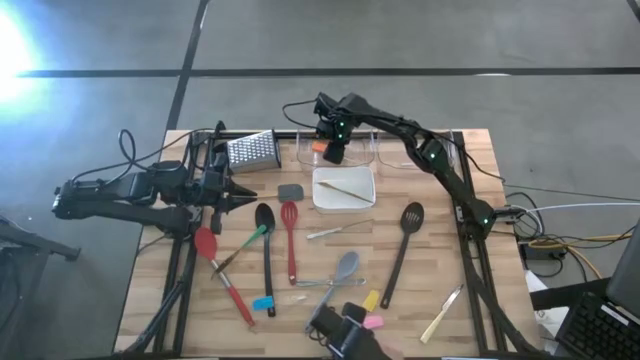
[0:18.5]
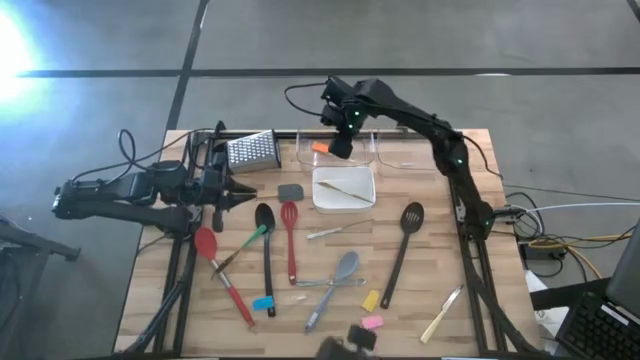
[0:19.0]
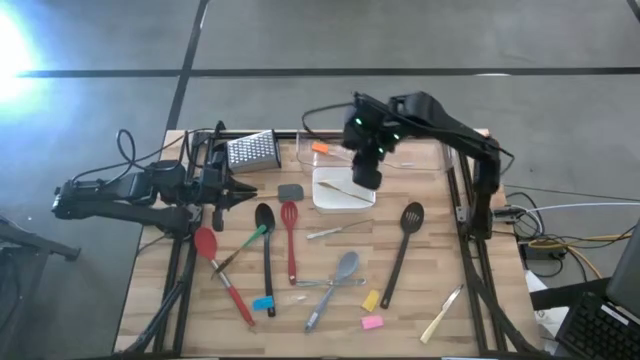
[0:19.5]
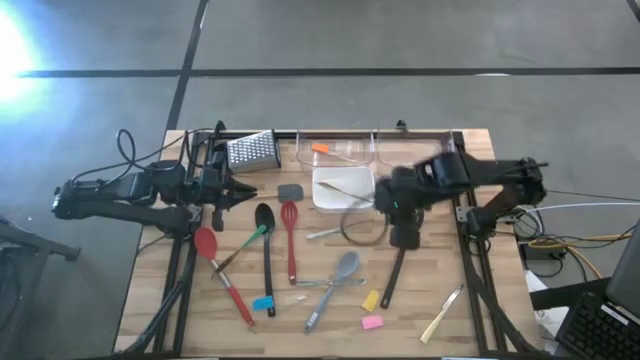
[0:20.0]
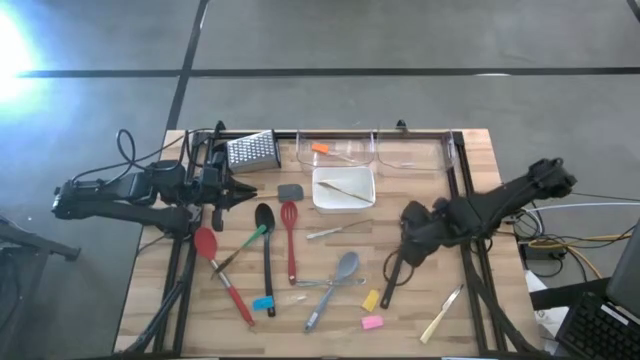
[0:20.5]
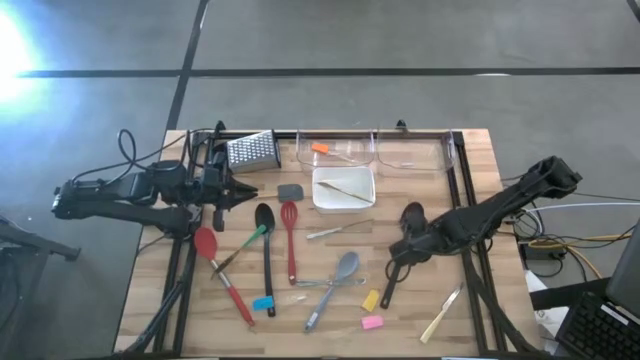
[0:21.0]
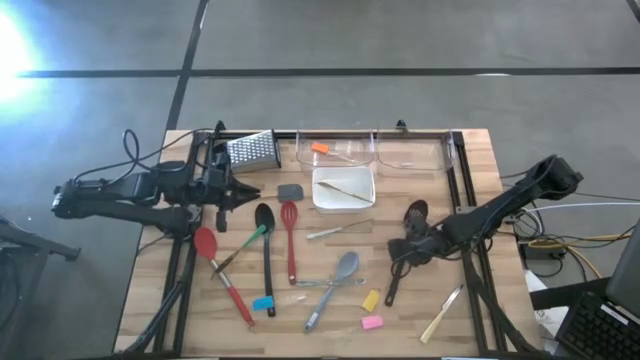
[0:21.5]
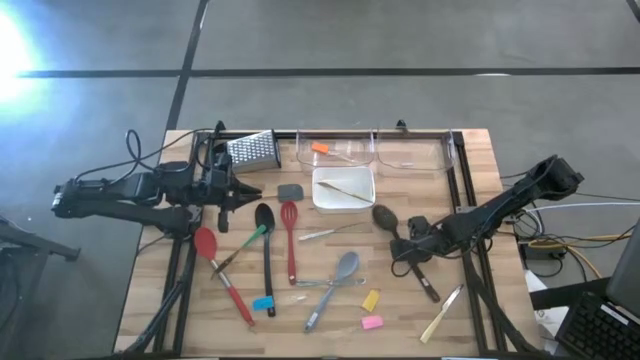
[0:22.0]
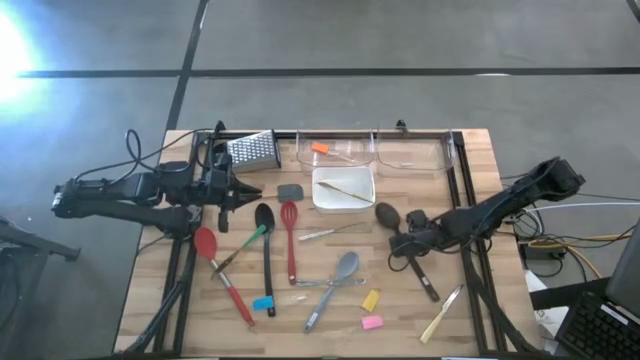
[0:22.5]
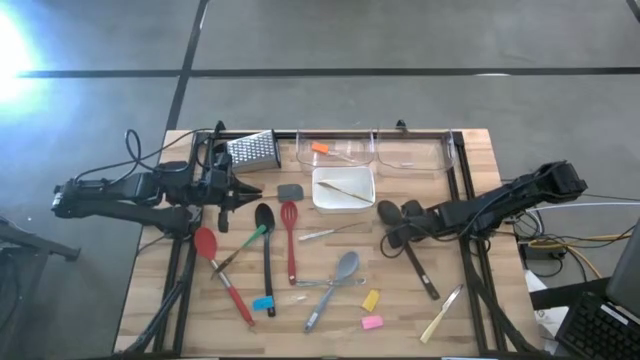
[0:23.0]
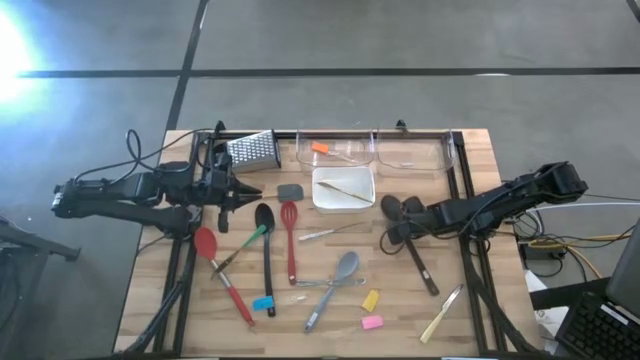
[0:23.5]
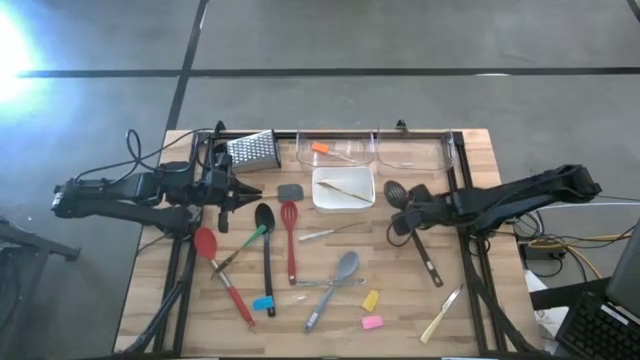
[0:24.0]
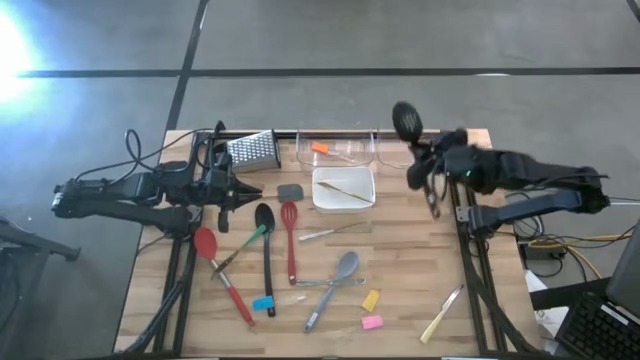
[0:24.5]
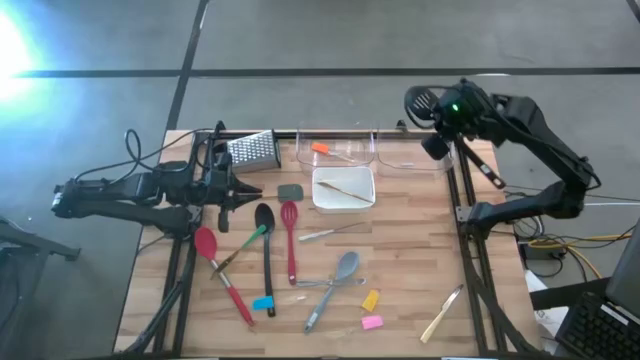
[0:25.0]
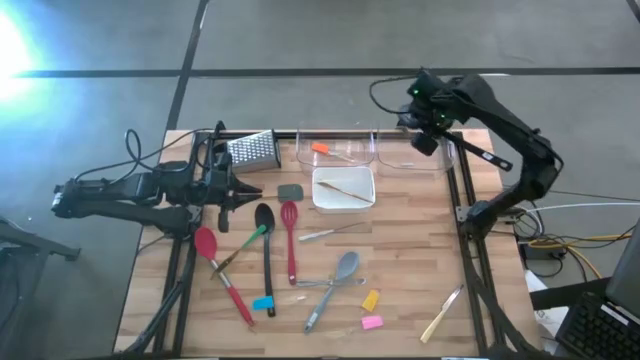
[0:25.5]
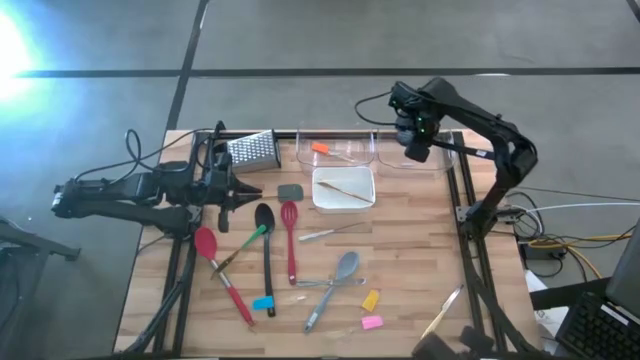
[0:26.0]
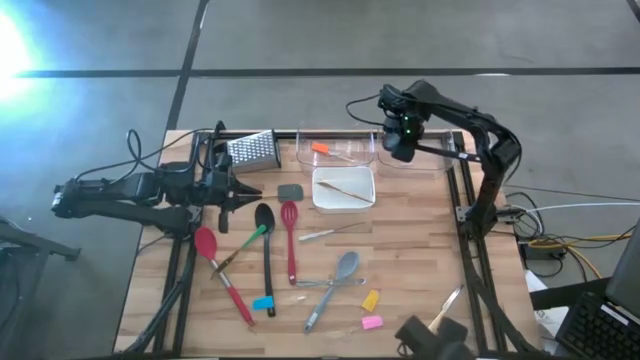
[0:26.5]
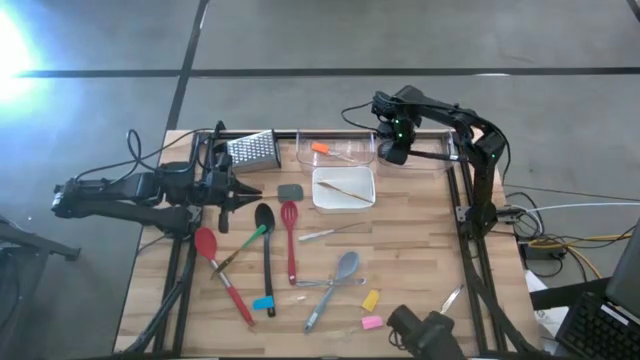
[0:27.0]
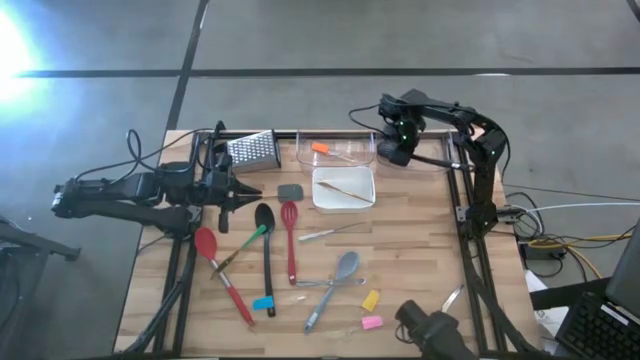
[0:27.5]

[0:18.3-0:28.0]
Task: Pick & Place Kitchen Items
Put the black slotted spoon into the right transparent bin

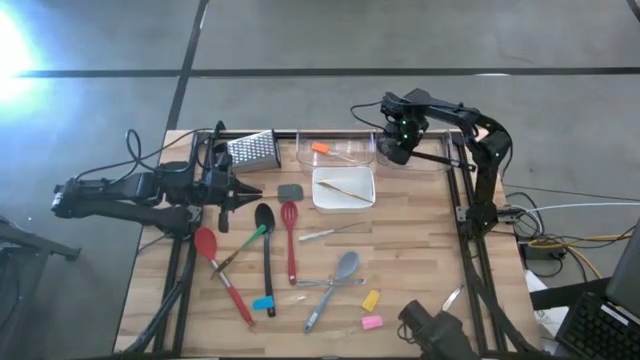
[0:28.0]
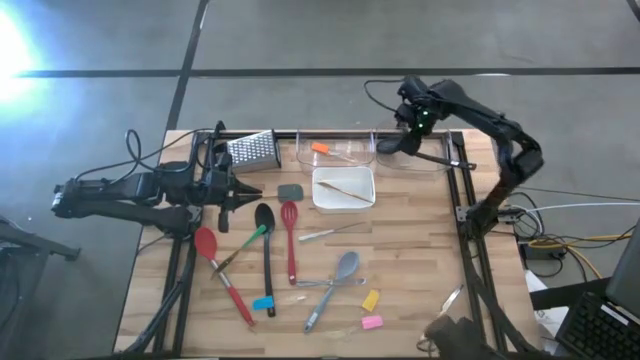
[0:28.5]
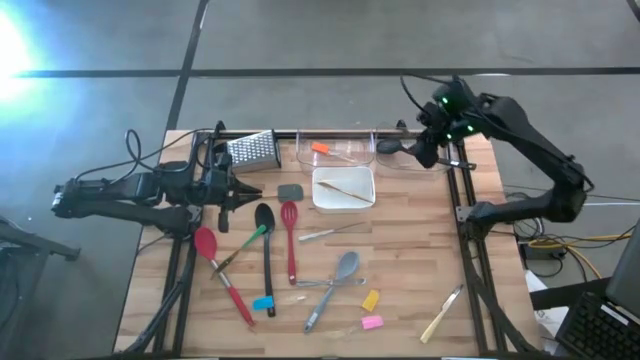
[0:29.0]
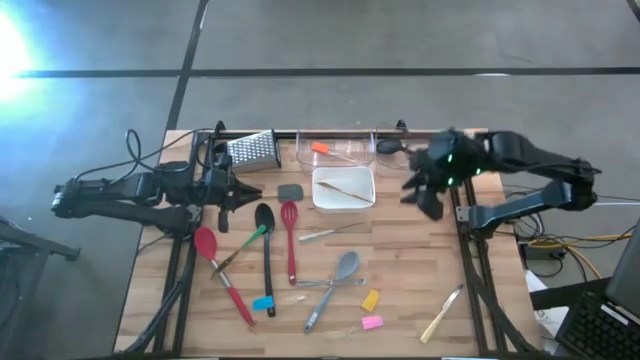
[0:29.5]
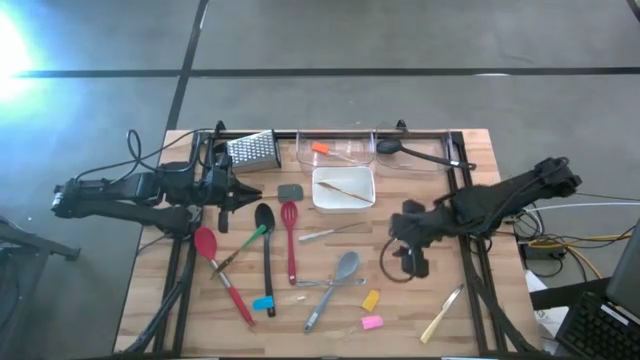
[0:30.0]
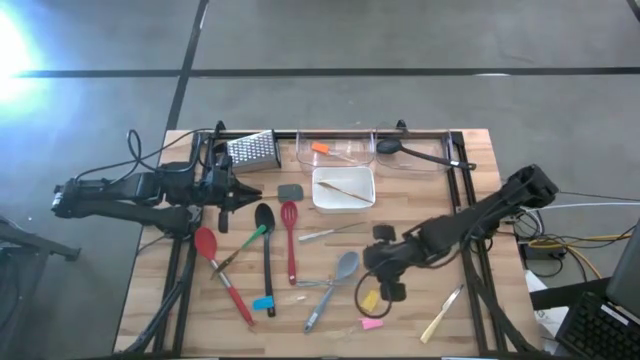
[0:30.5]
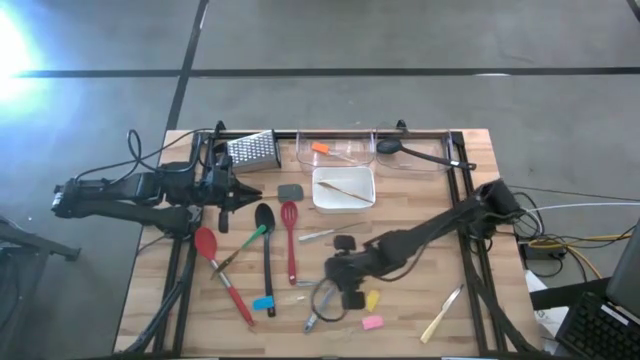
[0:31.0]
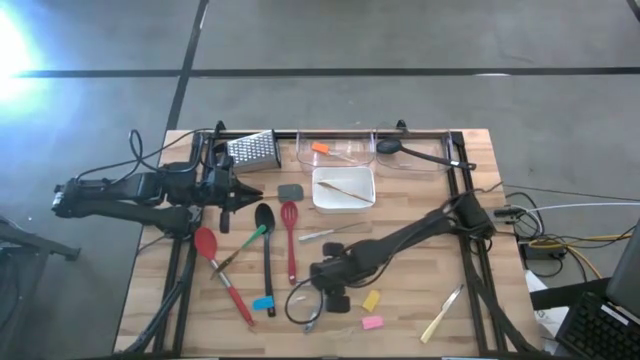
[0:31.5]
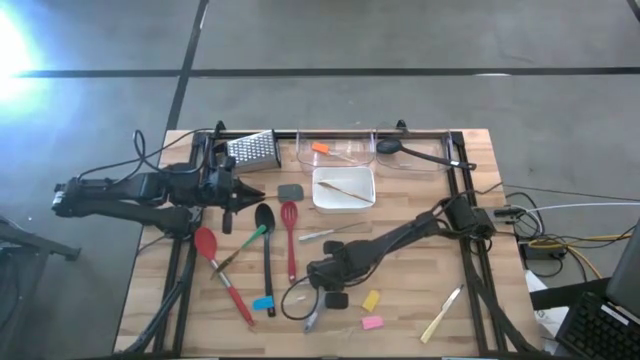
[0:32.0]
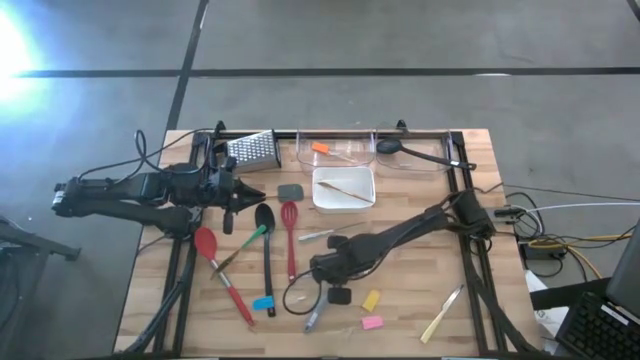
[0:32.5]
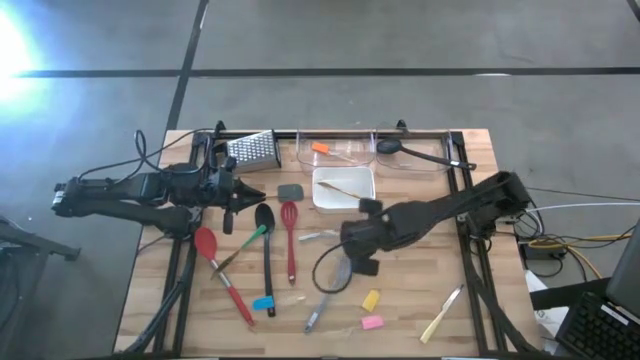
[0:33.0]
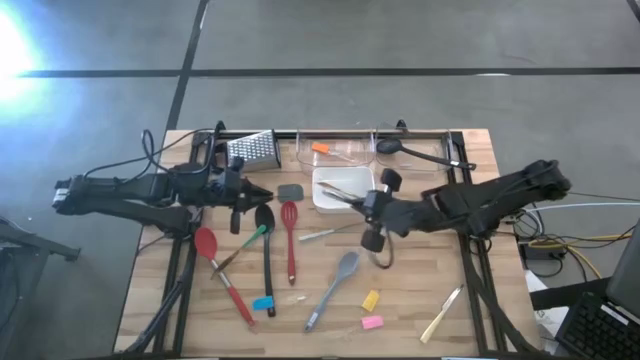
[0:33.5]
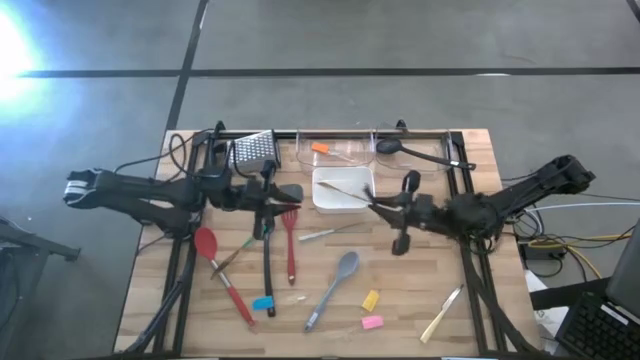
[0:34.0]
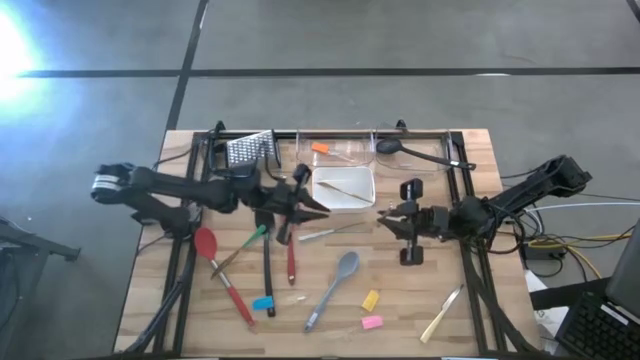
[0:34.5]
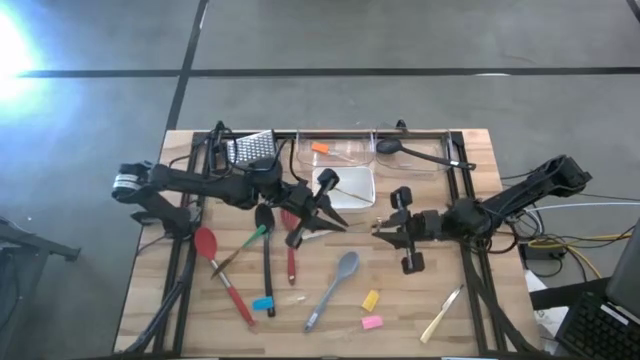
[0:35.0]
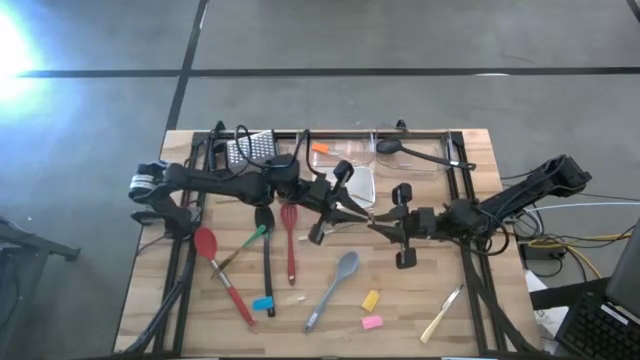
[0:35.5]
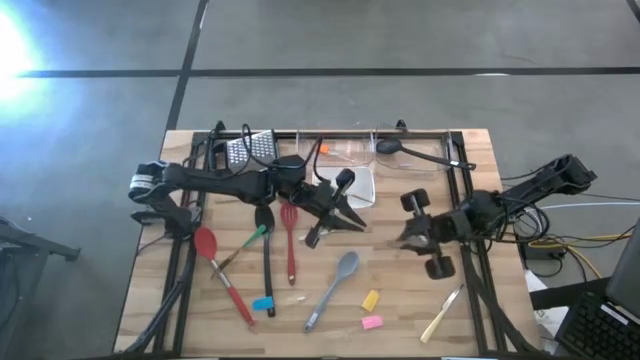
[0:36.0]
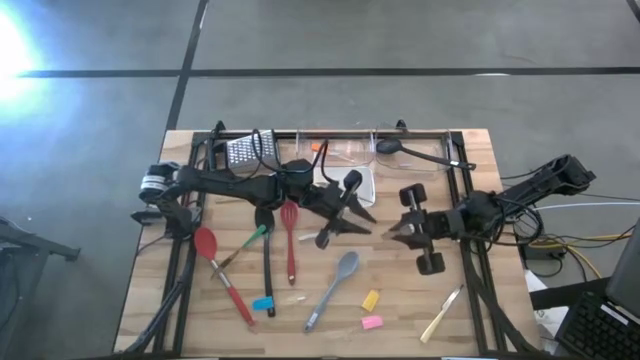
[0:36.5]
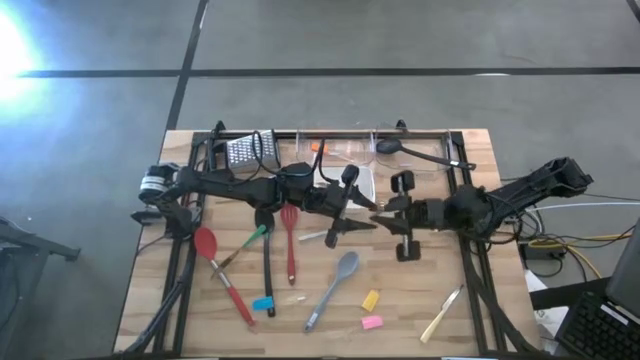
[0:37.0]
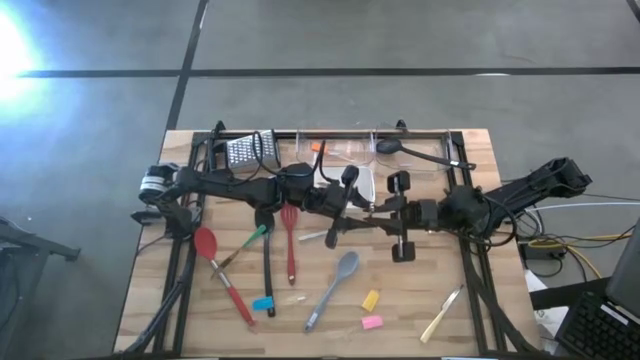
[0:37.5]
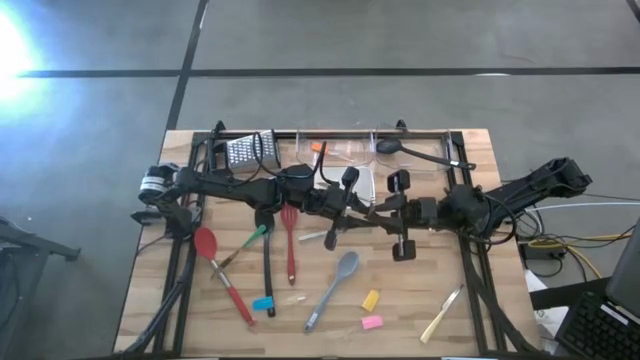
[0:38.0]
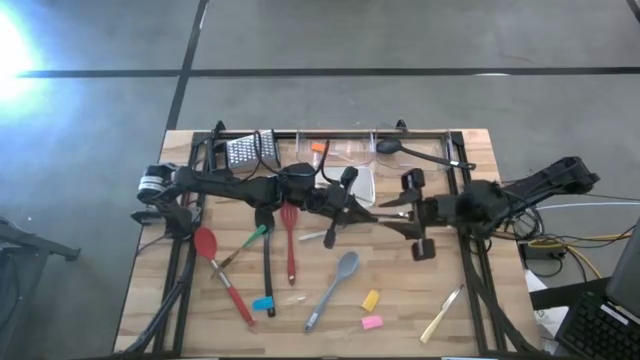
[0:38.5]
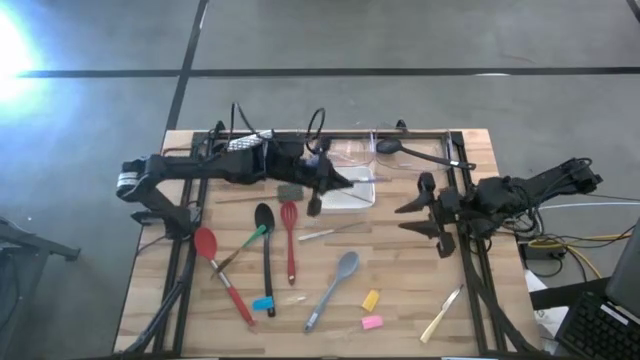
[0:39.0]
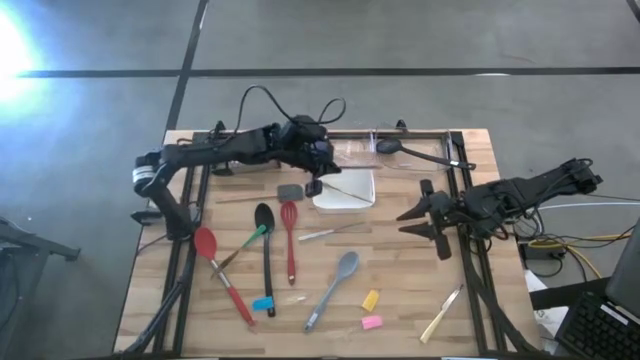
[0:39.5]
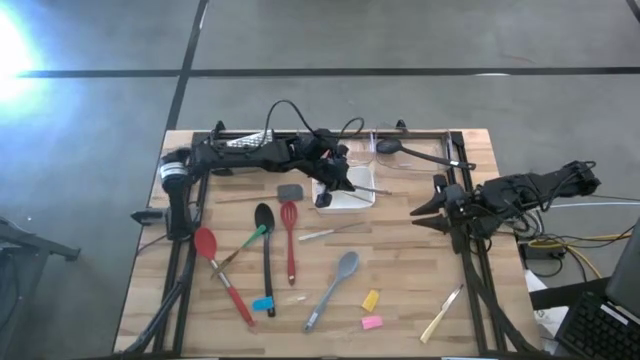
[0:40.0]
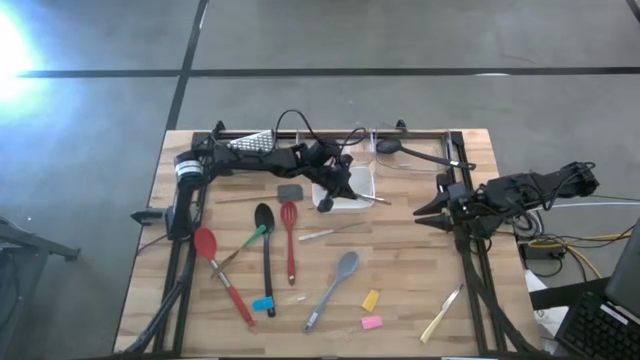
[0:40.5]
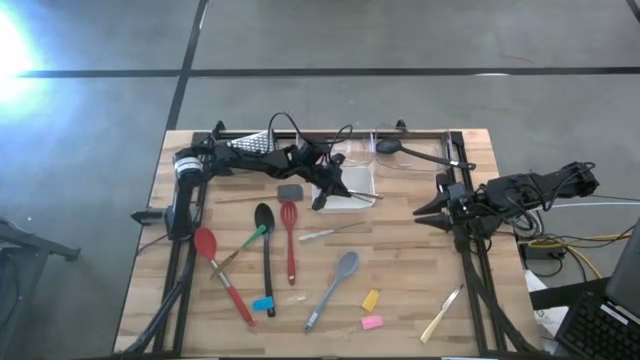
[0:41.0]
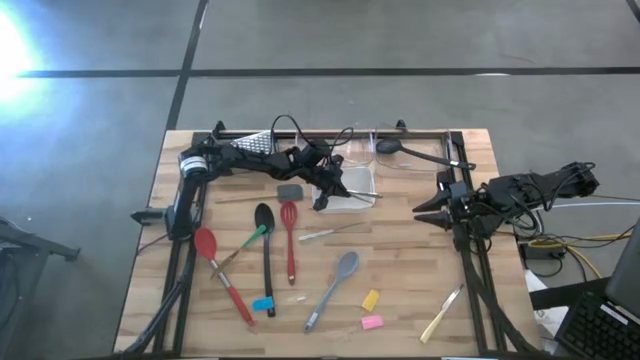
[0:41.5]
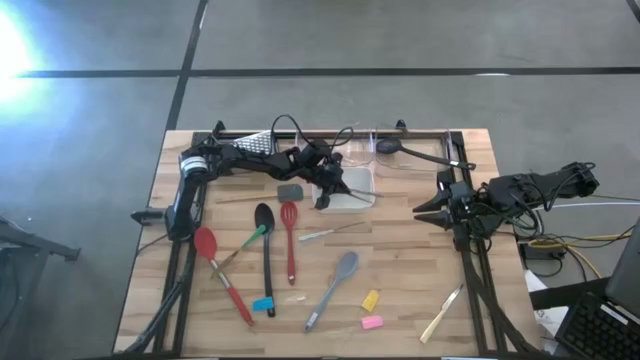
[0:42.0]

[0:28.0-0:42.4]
Put the silver table knife into the white bin
